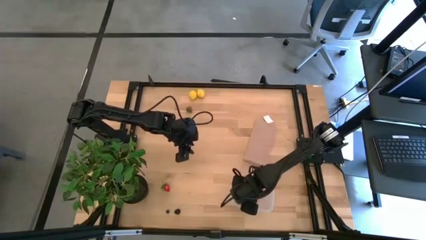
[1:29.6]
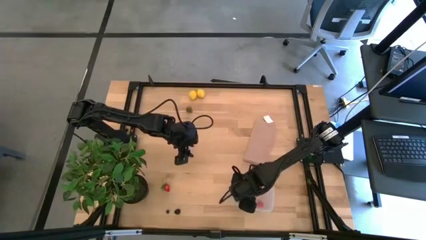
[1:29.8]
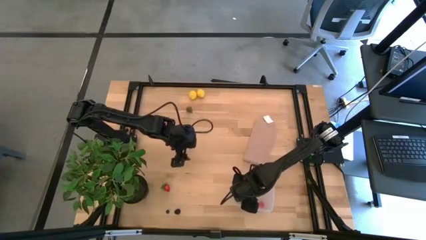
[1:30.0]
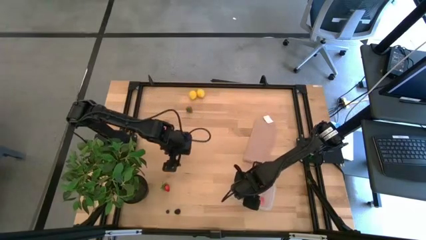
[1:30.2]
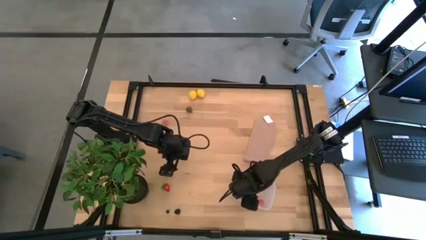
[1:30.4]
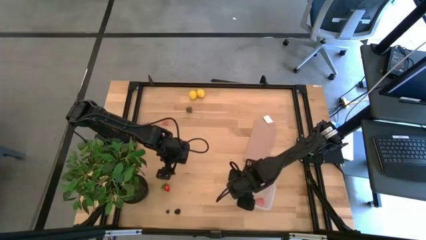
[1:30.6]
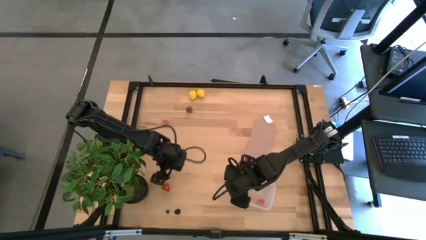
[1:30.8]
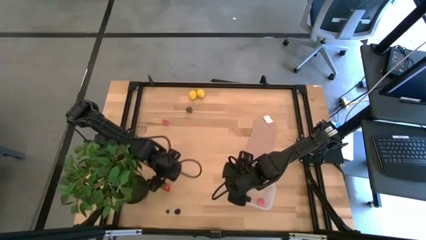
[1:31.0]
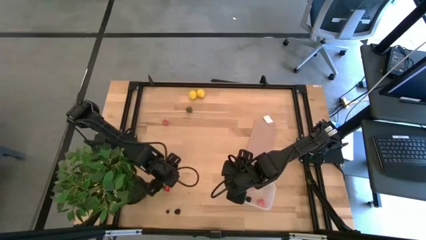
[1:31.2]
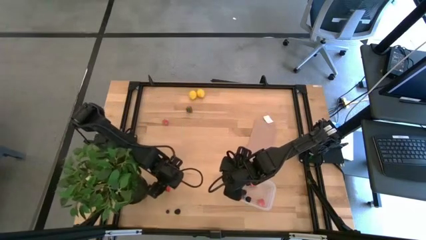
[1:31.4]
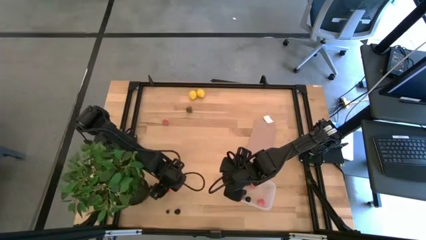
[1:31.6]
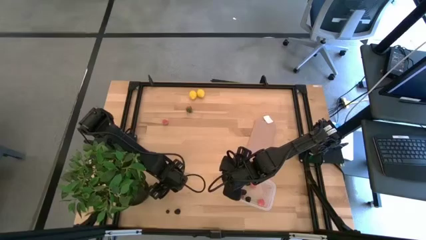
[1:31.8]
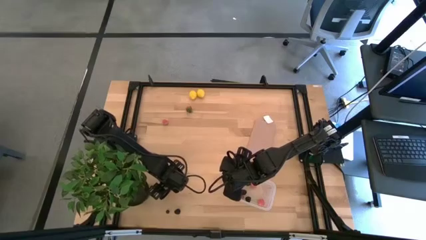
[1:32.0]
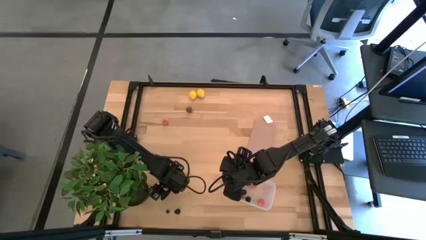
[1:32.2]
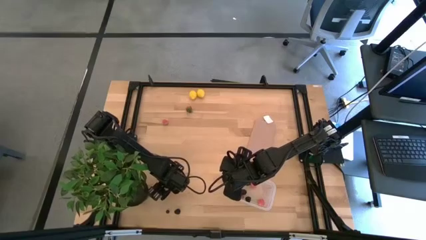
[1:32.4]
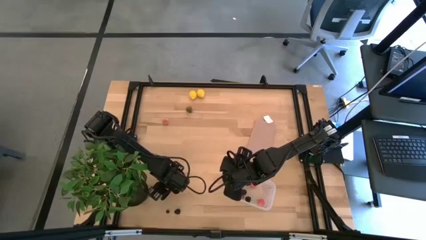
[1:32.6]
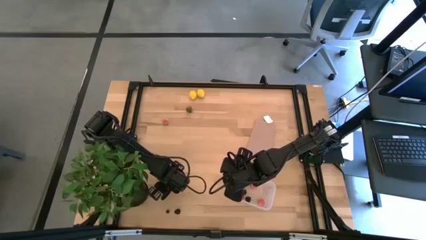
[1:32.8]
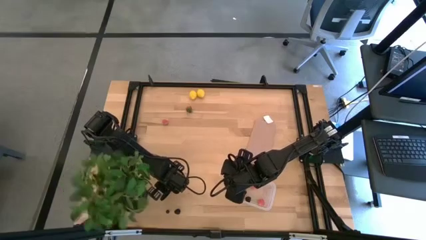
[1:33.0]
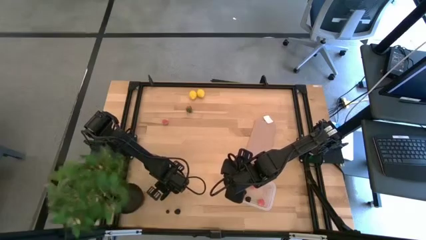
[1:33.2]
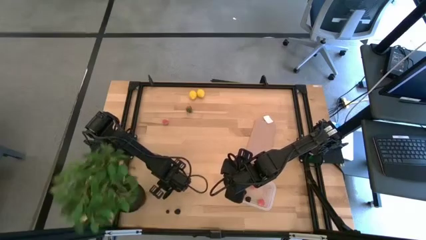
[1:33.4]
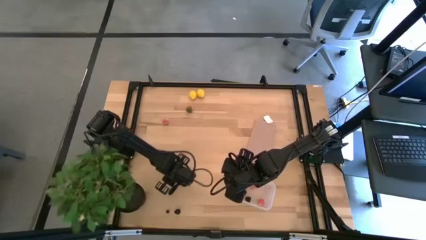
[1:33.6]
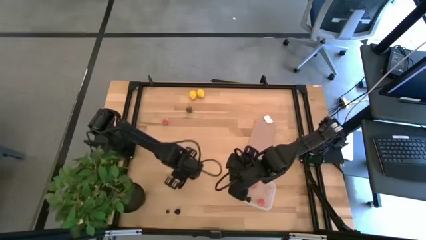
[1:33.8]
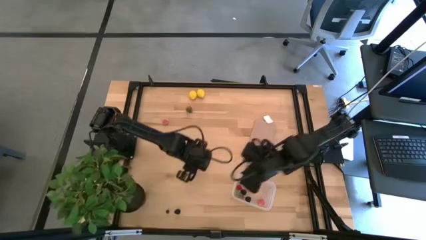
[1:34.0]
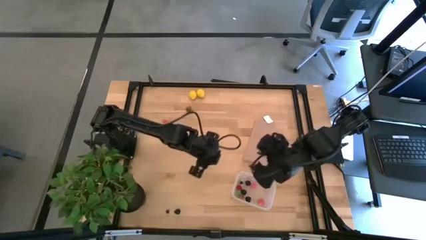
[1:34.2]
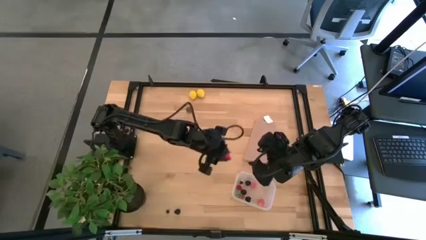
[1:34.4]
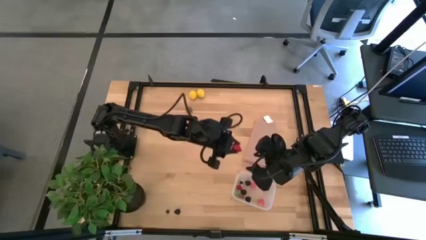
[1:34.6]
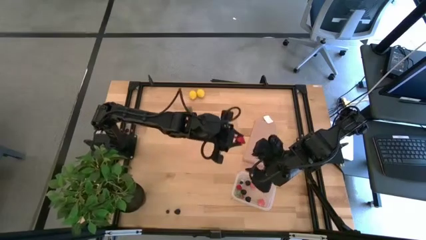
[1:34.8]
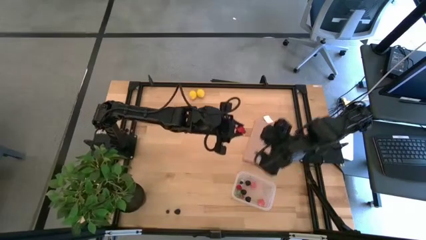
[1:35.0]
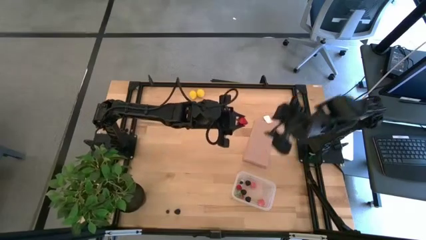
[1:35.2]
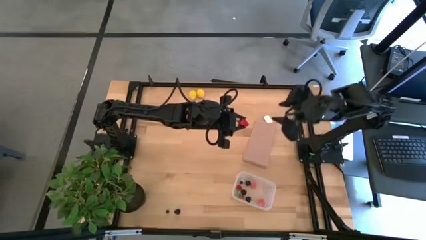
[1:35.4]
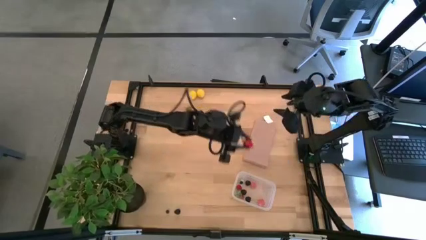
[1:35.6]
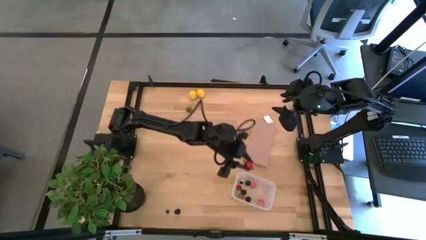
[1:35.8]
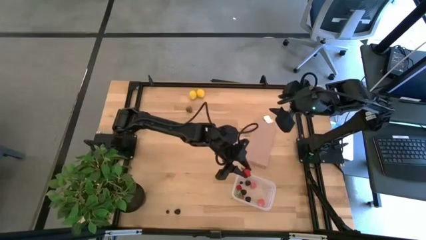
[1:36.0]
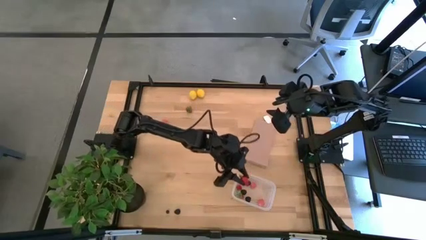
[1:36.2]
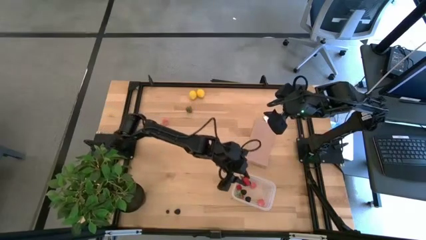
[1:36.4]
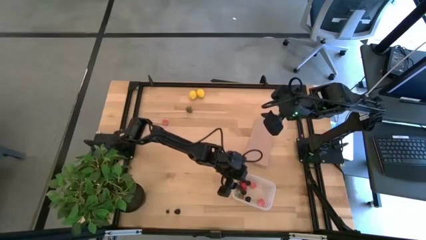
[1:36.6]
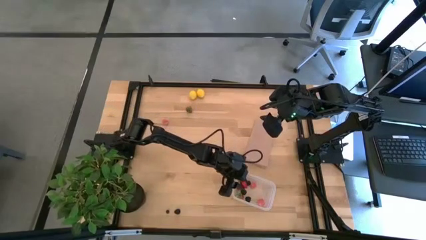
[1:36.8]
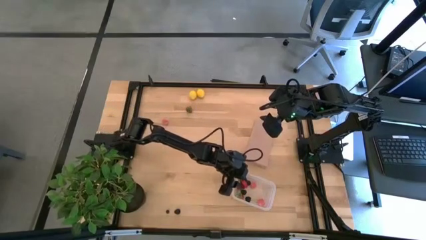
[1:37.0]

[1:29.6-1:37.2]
Task: Pick and placing Produce into tupperware
Put the strawberry into the transparent container

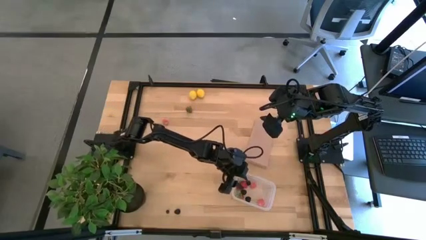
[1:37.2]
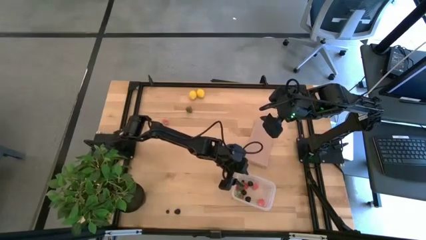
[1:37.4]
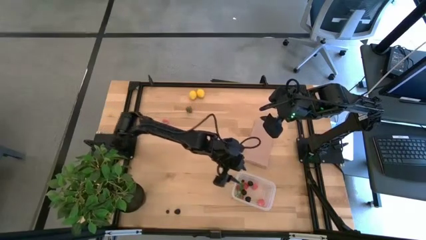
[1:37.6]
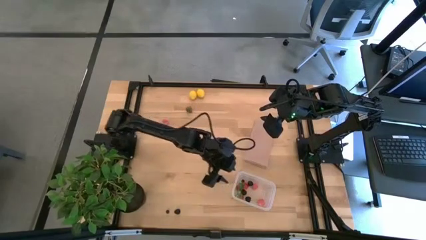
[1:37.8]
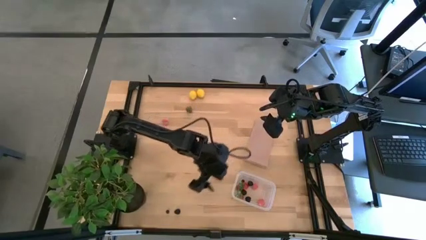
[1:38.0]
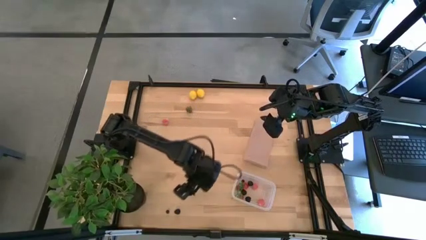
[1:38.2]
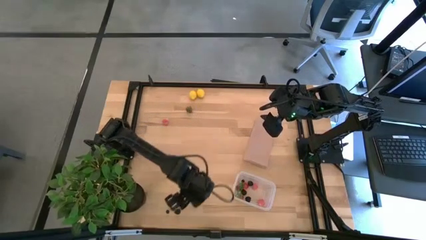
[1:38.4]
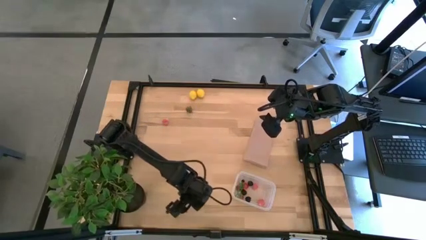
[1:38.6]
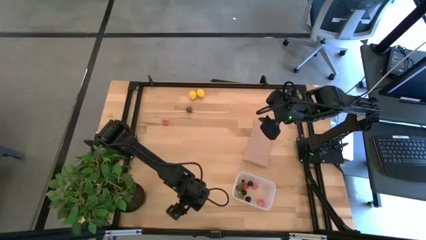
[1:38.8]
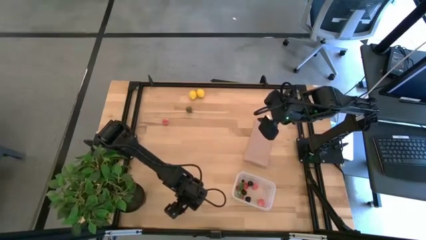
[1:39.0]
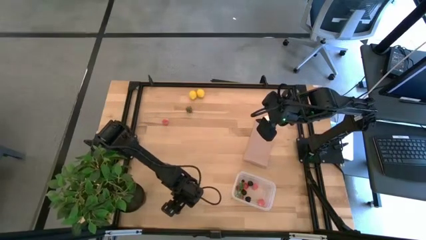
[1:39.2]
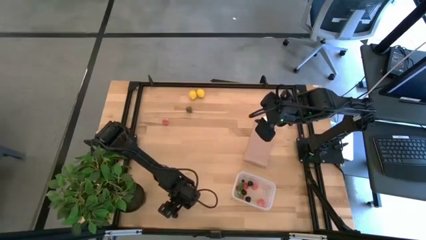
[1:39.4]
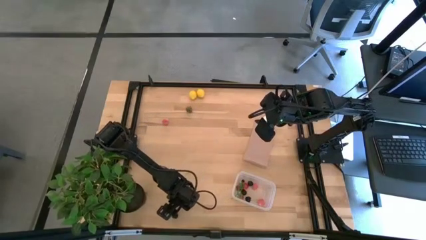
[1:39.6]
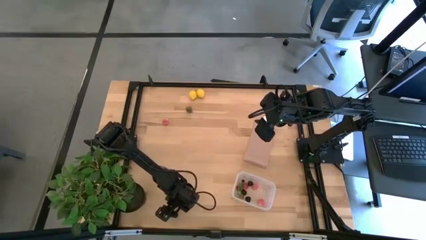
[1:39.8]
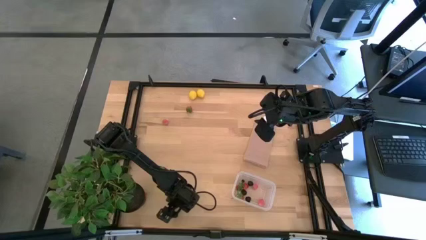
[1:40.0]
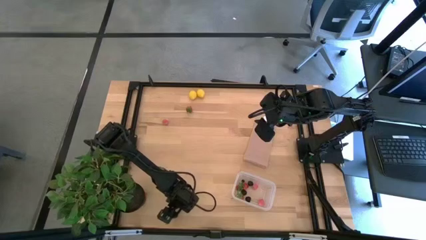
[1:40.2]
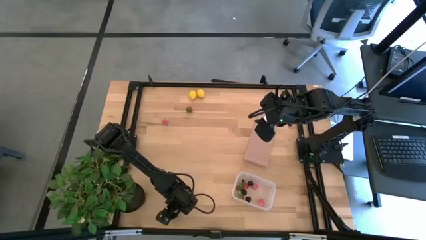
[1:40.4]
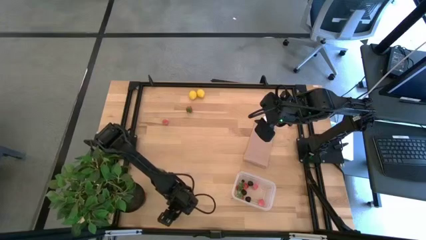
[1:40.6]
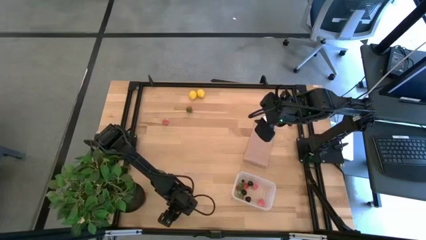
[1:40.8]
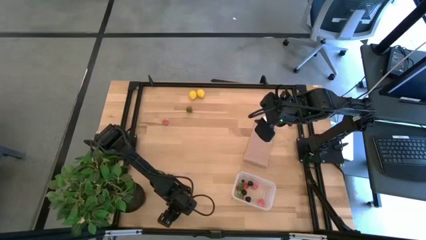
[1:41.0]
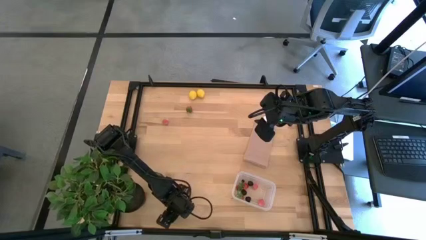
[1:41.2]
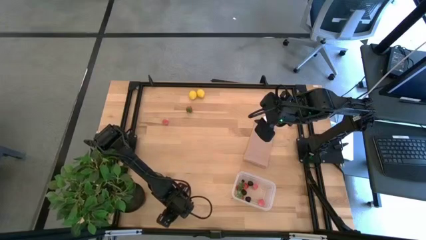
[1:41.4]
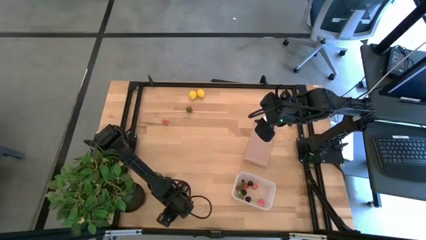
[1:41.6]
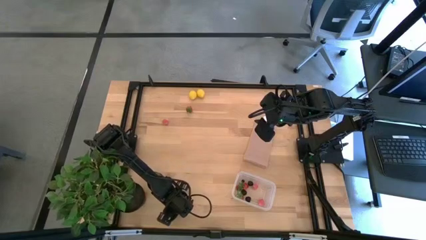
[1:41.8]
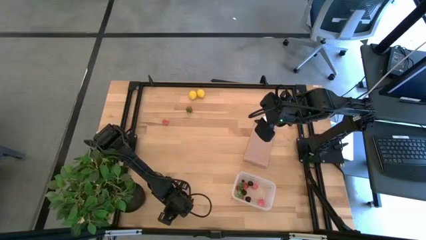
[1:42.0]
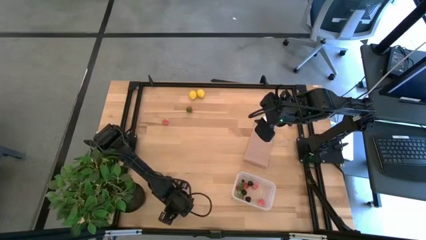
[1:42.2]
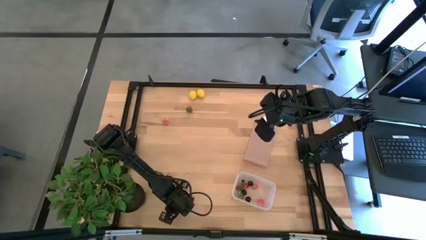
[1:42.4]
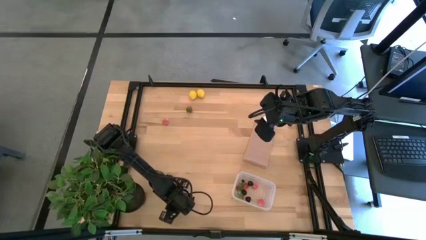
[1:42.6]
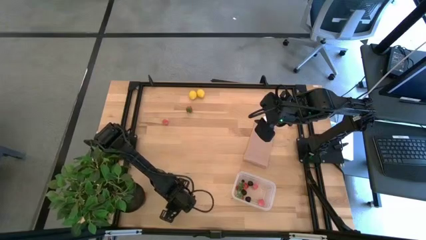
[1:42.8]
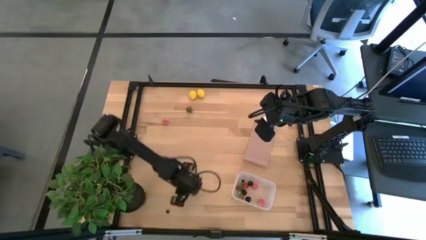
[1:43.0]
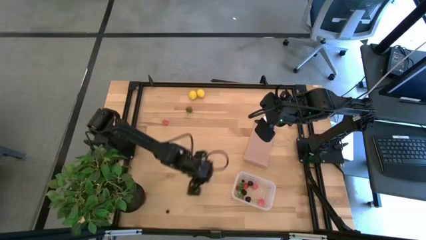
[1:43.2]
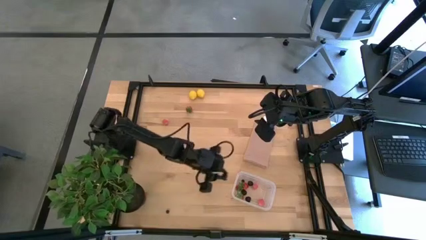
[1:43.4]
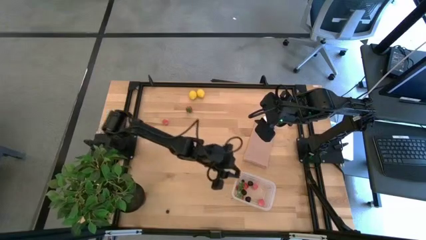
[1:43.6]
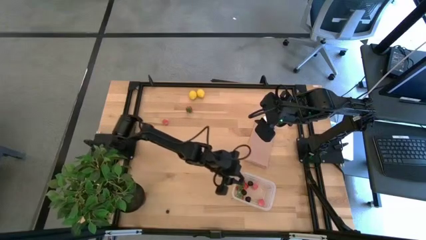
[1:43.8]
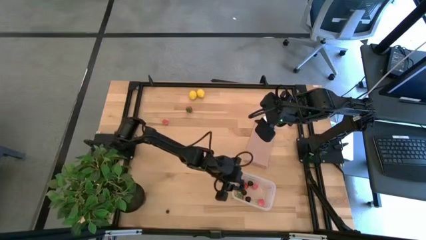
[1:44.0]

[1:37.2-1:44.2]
Put the blackberry into the transparent container

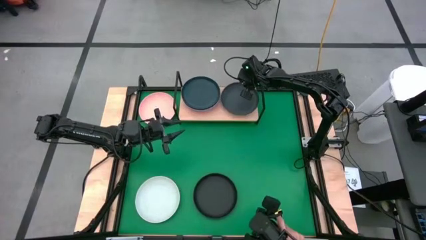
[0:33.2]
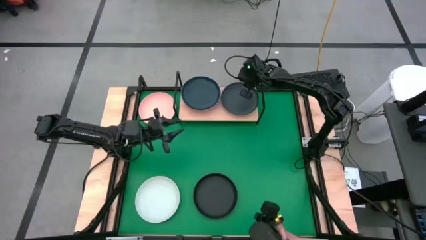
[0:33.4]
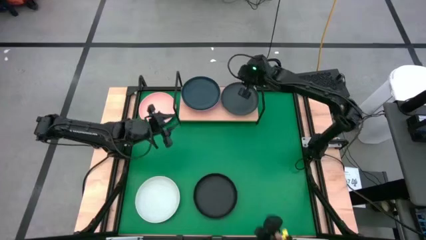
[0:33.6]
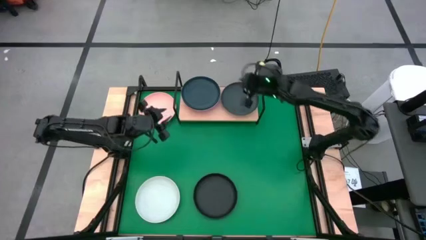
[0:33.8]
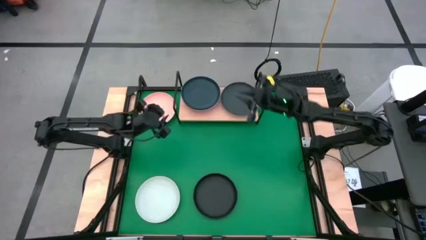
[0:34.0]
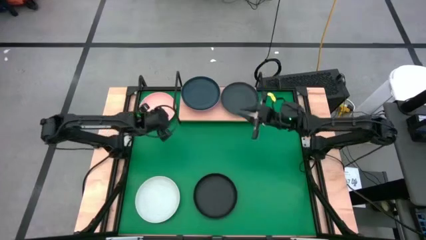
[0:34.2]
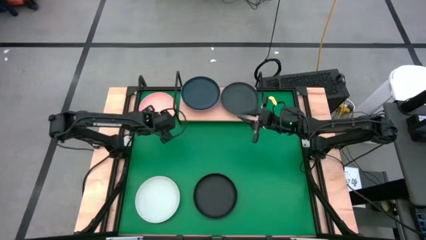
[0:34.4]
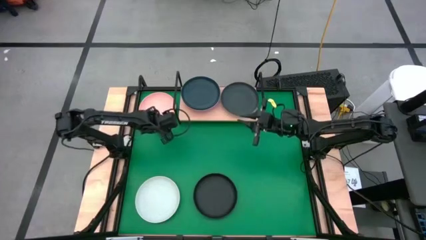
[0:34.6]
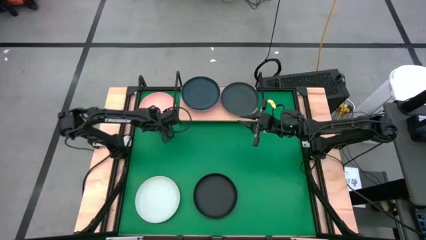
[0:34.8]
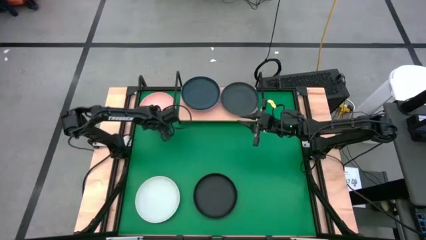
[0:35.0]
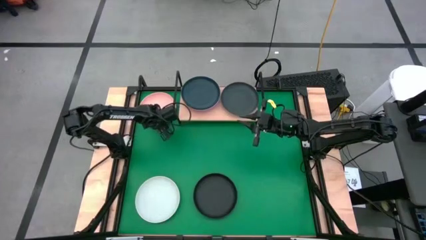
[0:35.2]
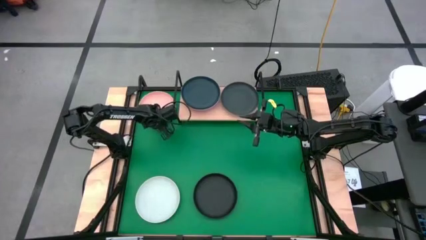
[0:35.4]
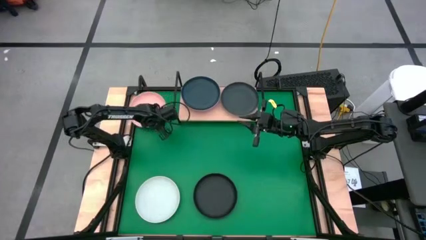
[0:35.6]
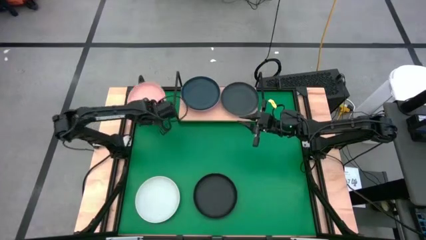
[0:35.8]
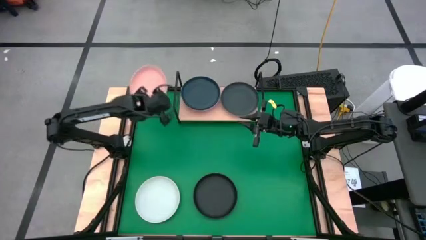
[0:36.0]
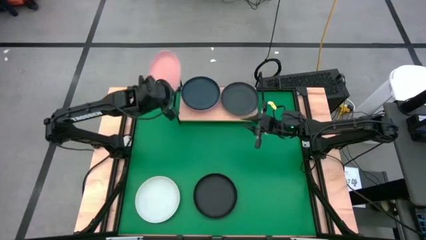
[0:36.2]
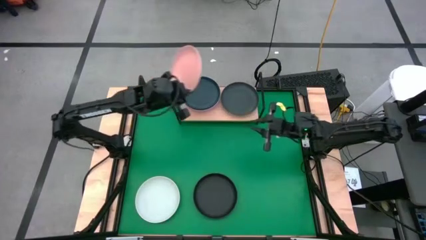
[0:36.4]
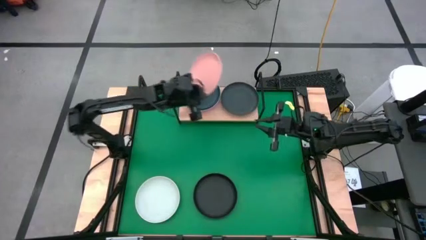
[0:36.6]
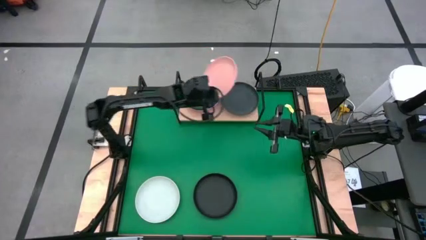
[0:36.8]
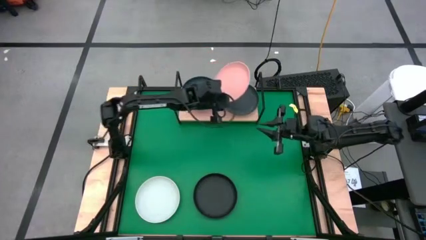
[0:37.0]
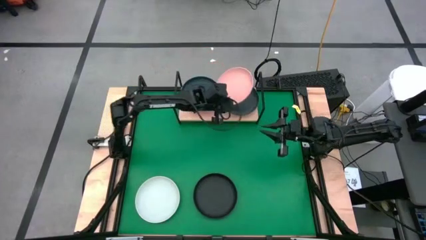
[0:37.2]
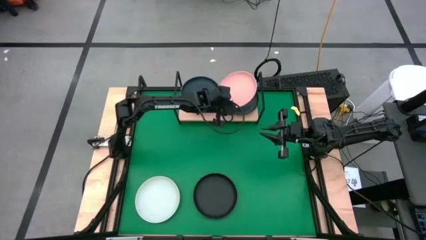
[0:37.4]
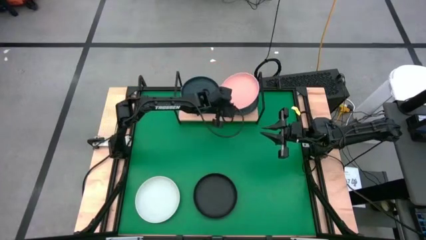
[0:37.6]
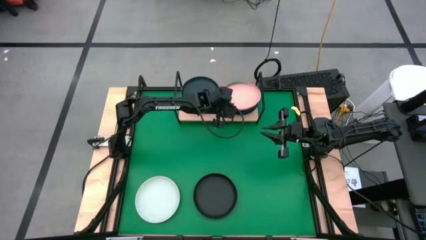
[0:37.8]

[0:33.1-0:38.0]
Task: Place and stack plates onto a shelf
Stack the light pink plate on top of the dark green plate on the shelf
